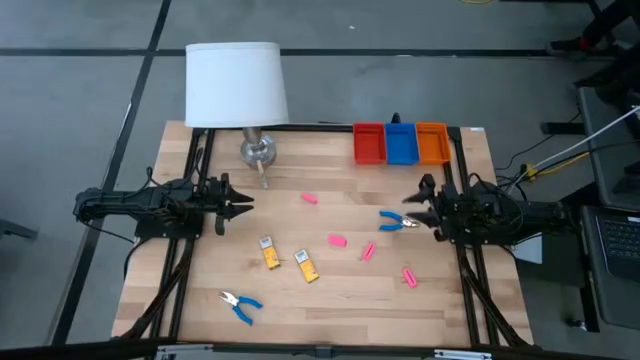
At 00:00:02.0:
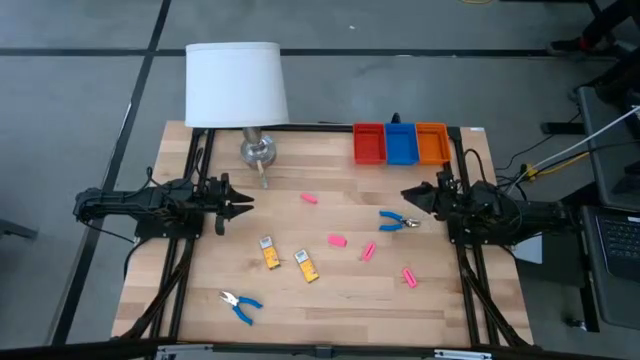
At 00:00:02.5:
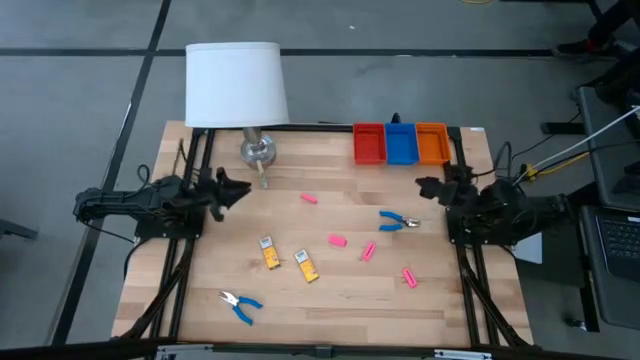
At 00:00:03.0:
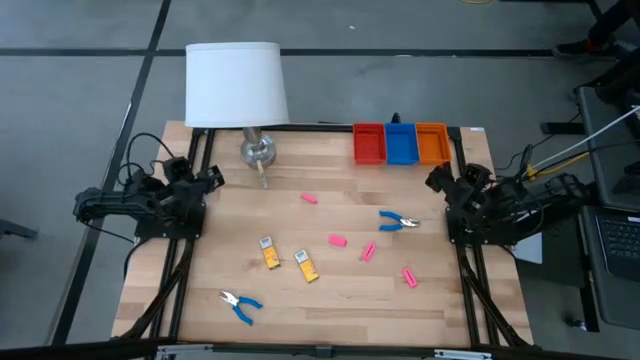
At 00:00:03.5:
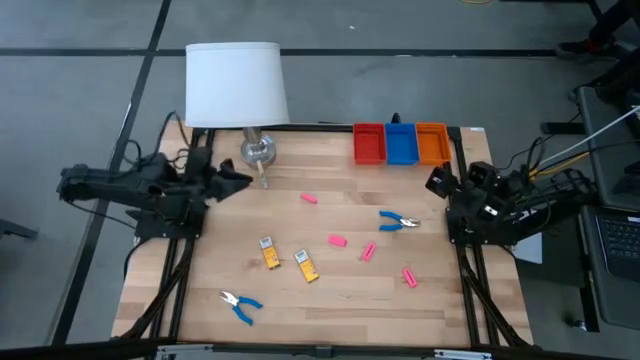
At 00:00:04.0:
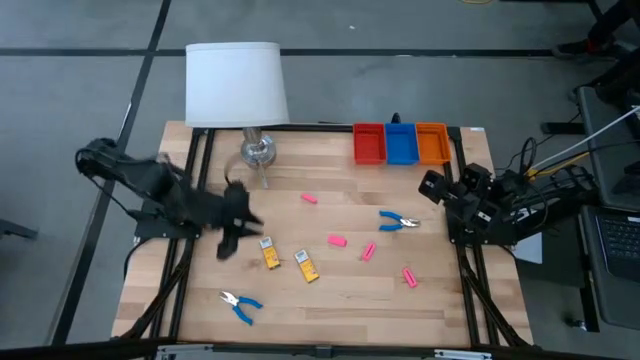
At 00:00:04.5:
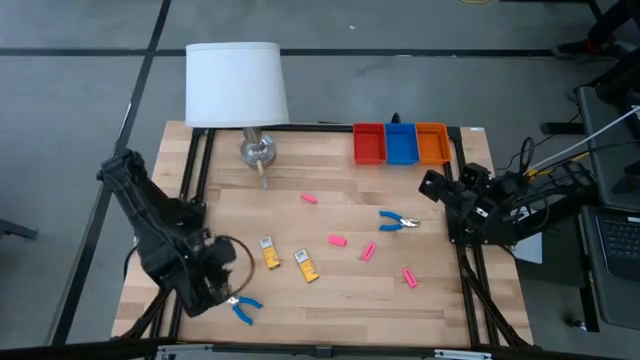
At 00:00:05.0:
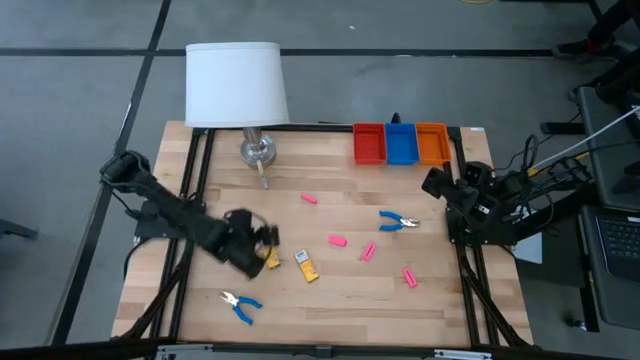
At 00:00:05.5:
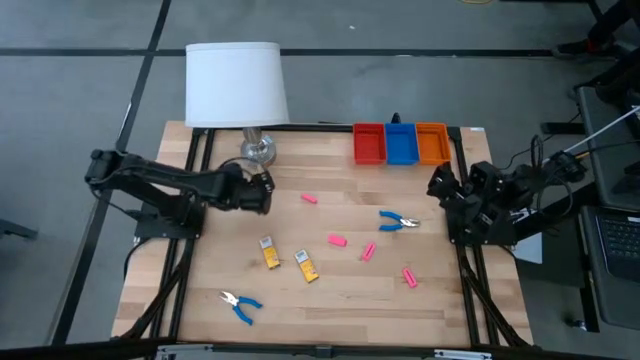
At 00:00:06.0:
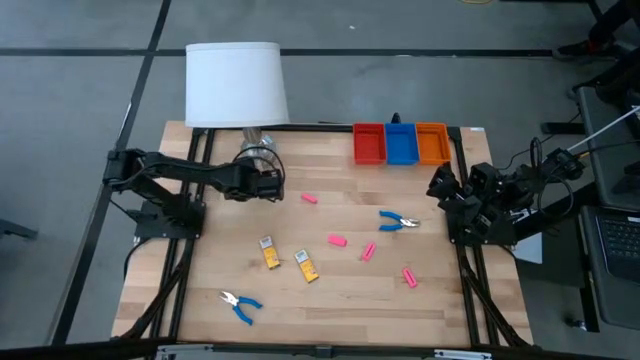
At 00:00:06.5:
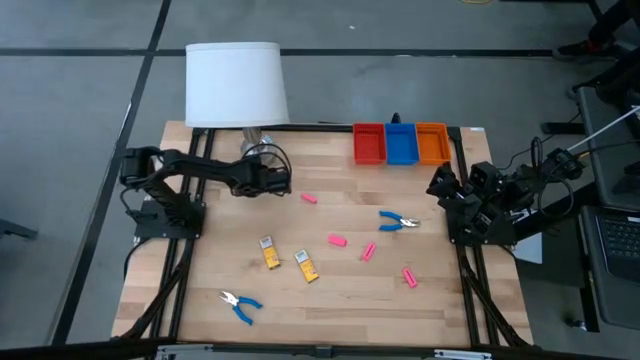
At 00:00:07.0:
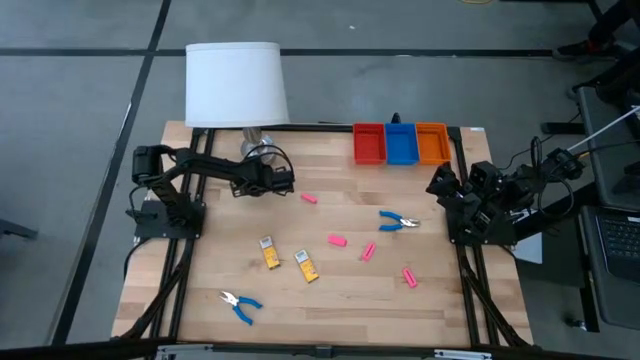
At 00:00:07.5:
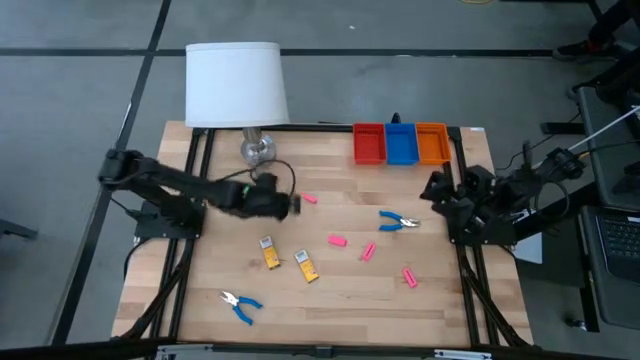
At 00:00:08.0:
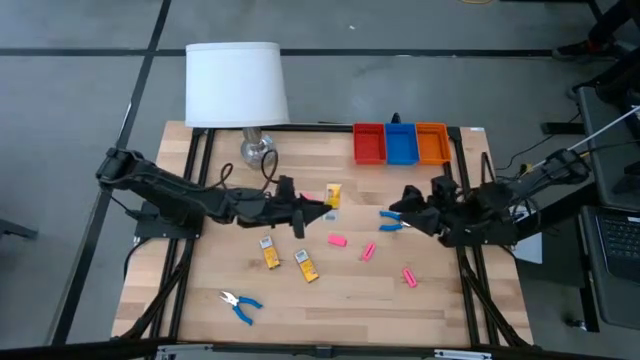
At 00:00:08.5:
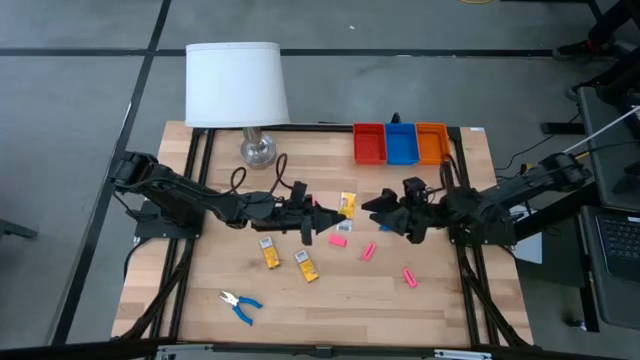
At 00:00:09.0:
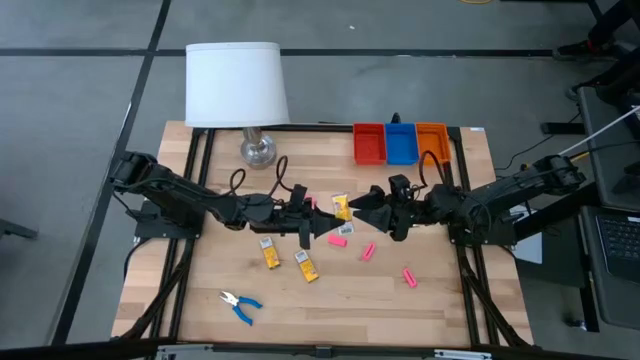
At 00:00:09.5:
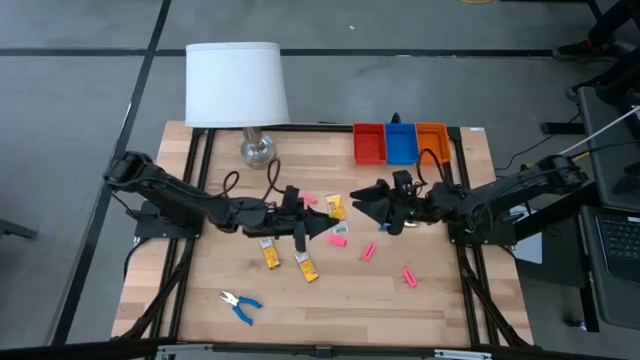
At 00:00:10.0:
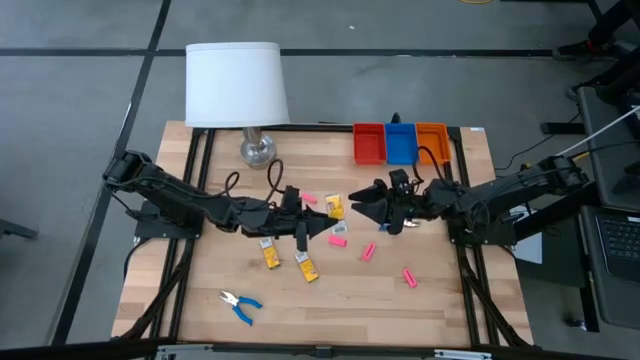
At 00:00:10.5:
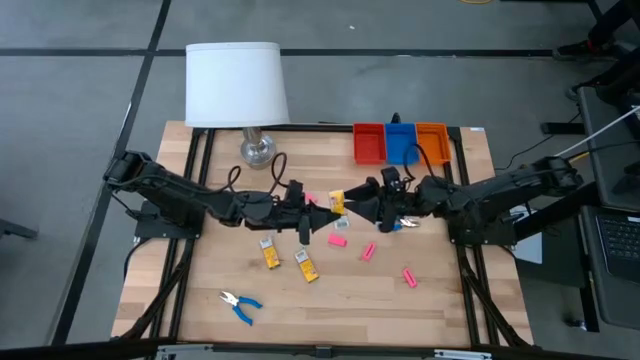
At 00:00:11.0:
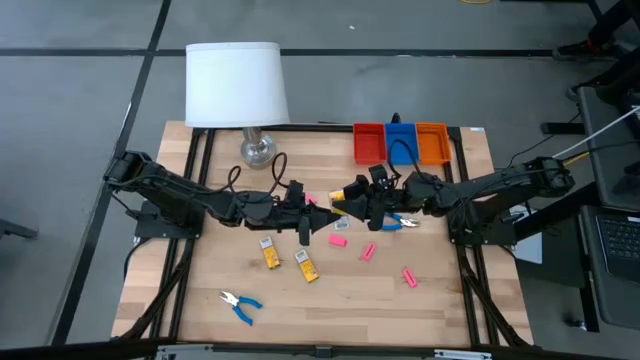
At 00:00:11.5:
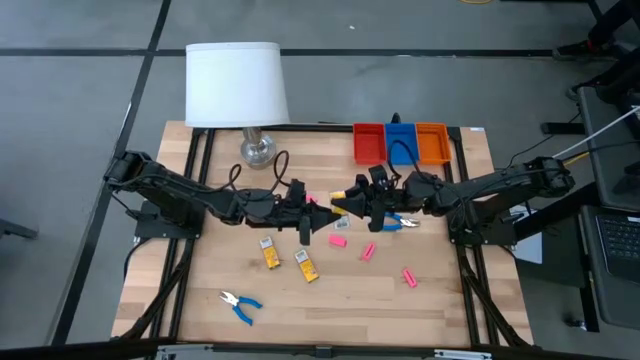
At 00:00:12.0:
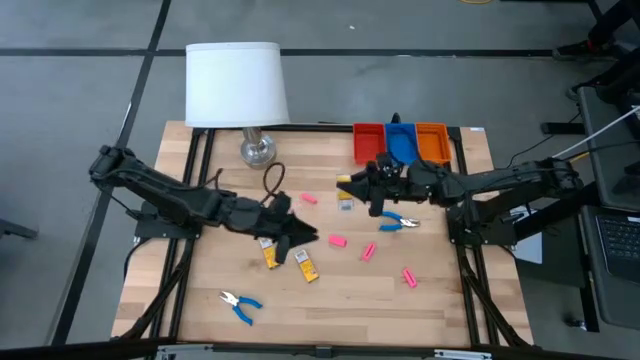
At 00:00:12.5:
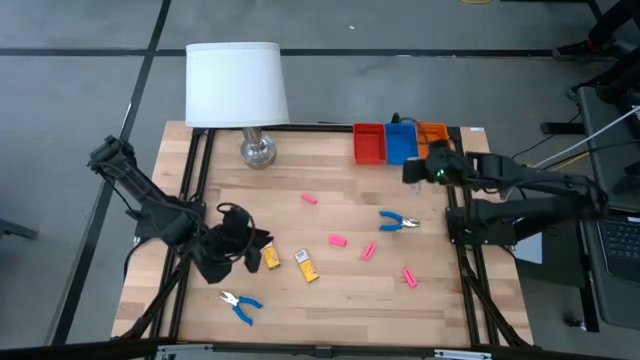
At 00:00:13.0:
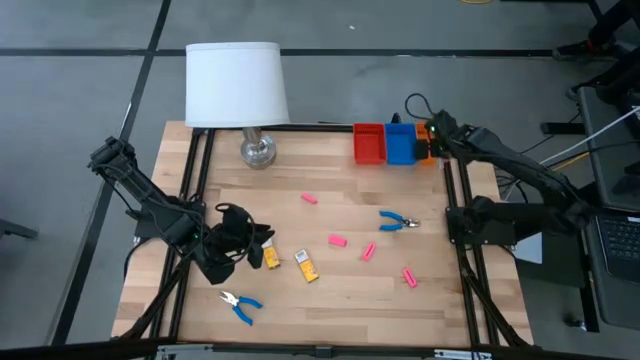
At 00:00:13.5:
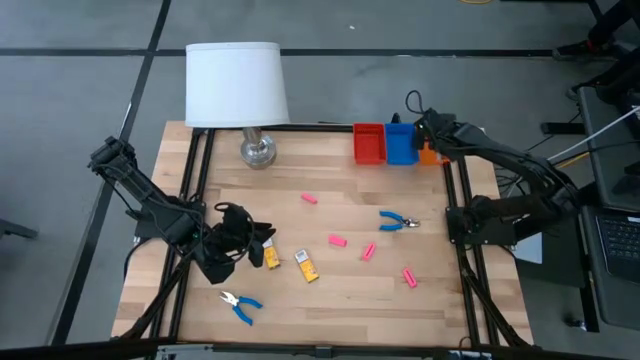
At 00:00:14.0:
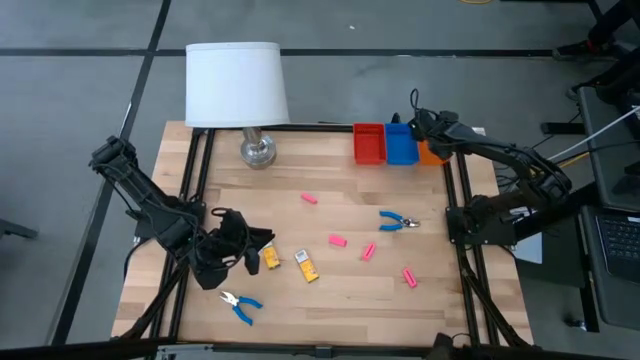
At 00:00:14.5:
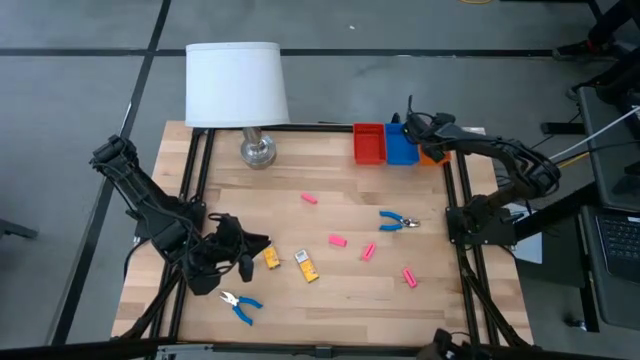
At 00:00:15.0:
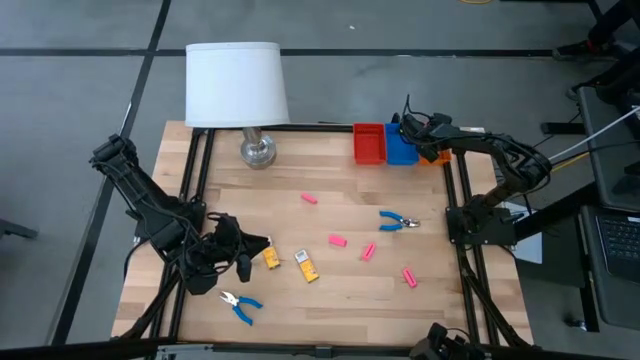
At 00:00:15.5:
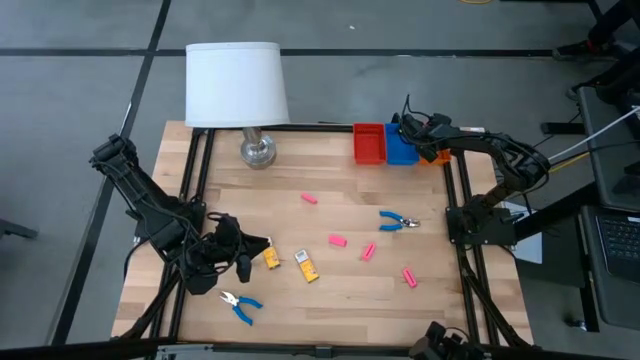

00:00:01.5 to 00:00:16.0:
Task: Pick & Place School Supplies
Put the top crayon box into the orange bin

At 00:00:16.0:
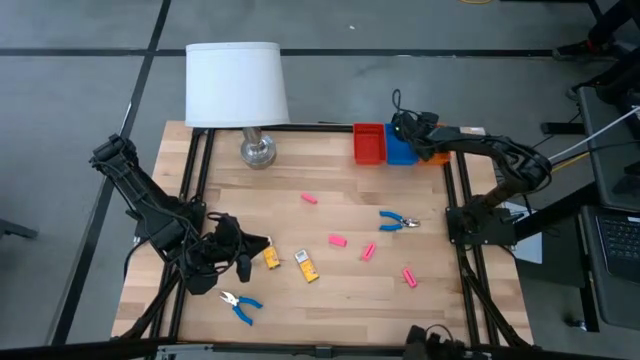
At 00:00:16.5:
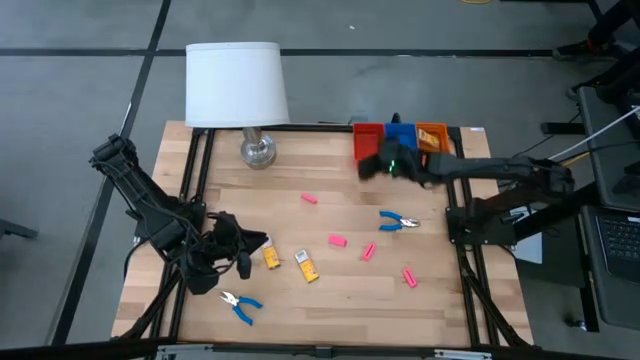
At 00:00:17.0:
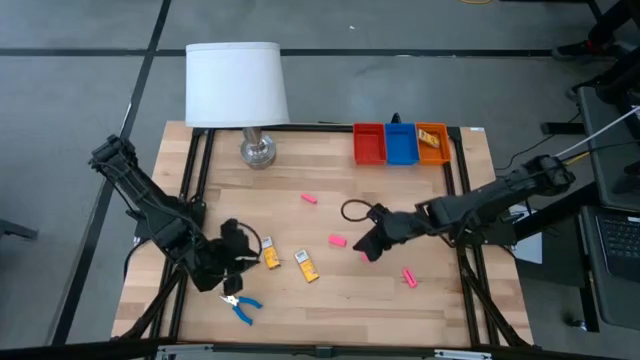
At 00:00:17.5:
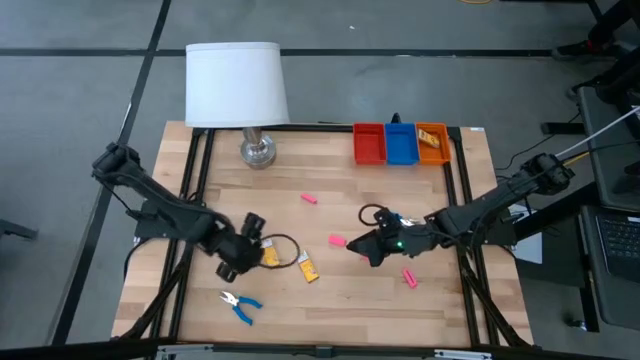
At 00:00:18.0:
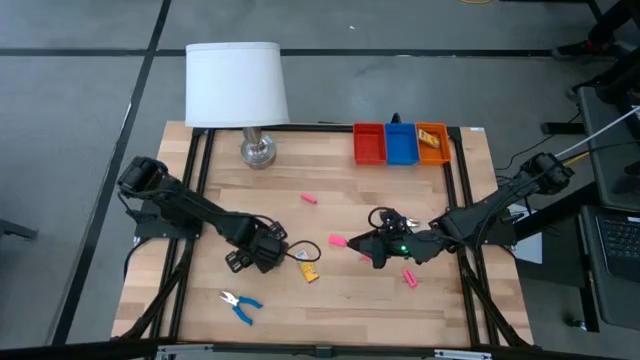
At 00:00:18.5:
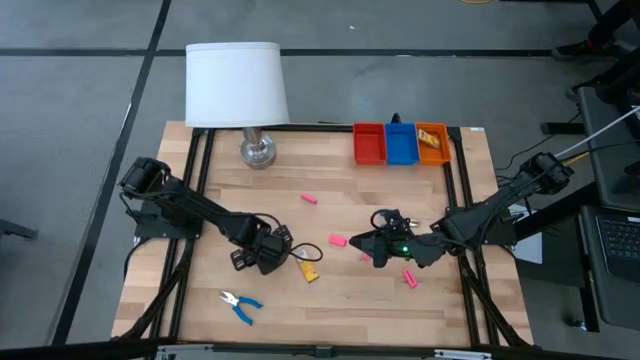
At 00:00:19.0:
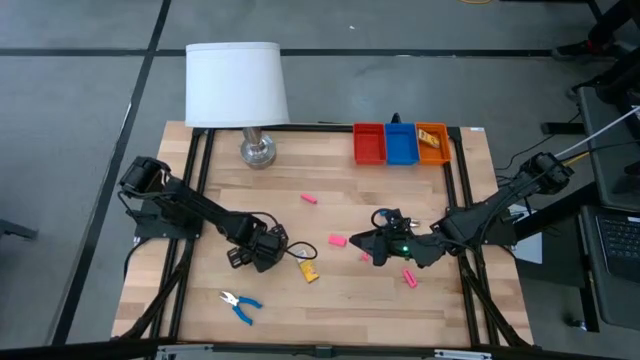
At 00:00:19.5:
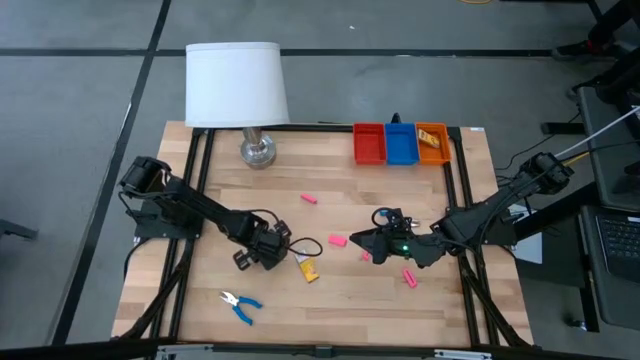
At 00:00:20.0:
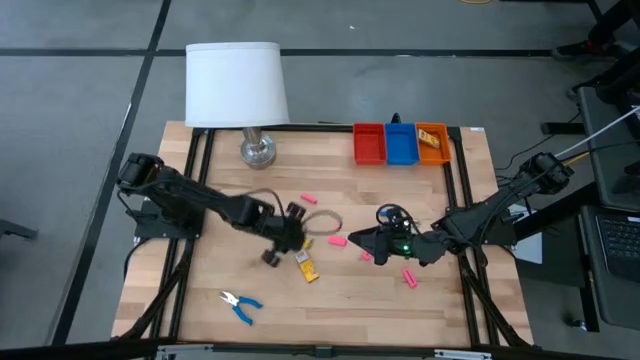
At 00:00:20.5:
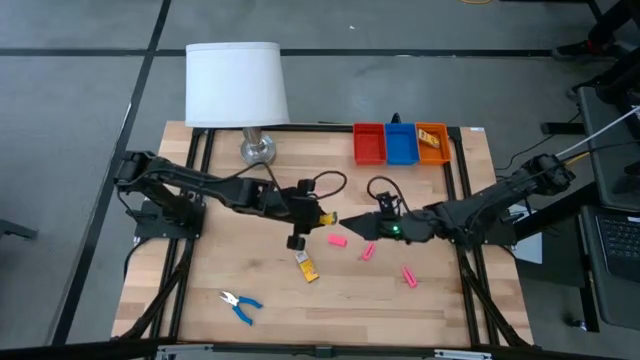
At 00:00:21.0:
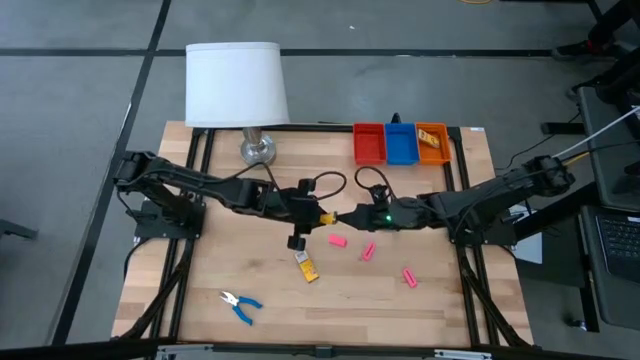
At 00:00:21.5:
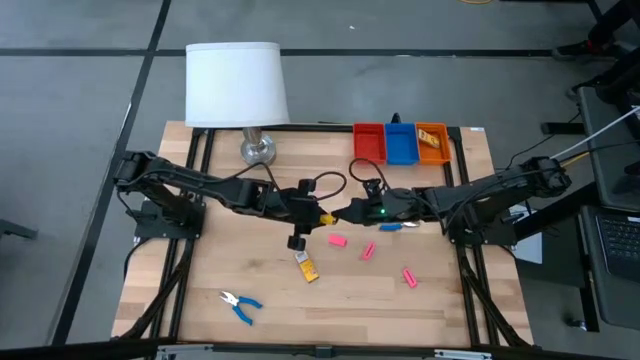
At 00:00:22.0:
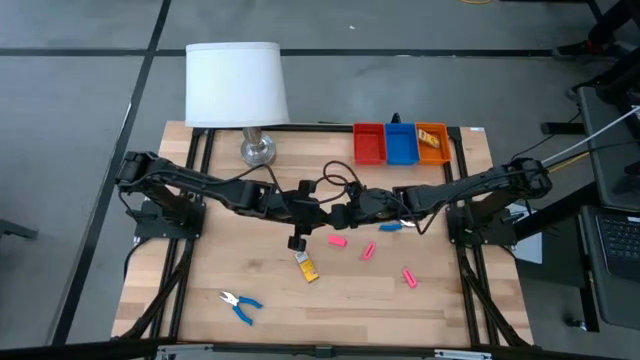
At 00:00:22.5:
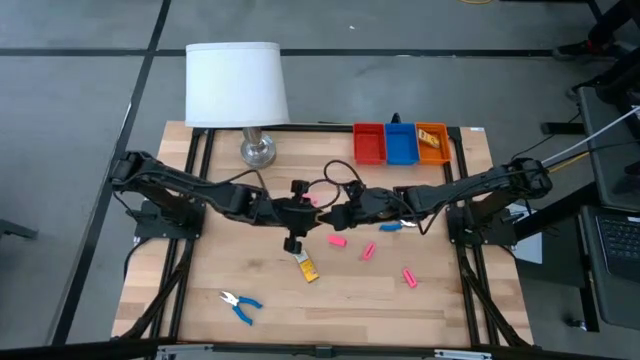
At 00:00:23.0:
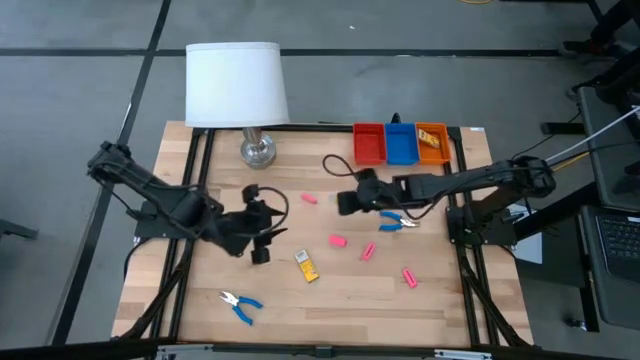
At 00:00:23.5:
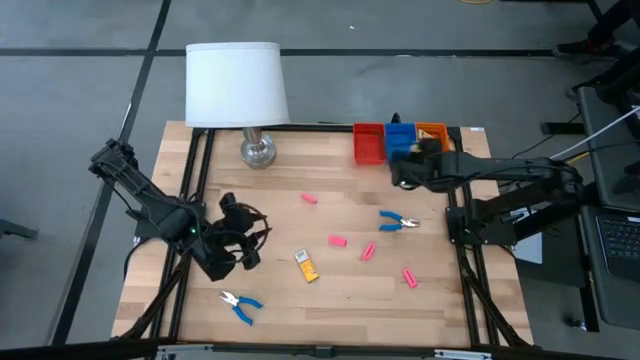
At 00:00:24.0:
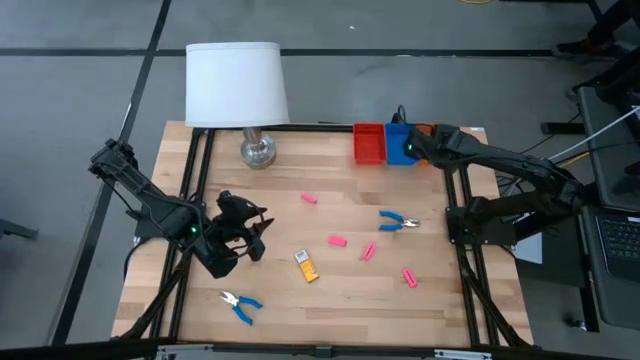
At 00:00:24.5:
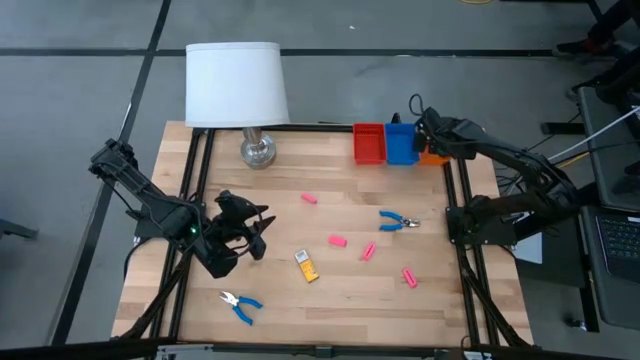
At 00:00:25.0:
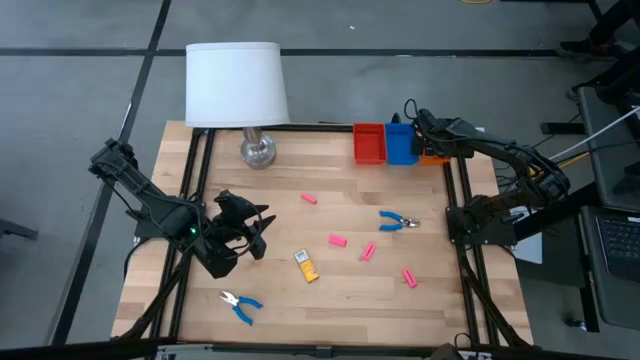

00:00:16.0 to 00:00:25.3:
Put the left crayon box into the orange bin
